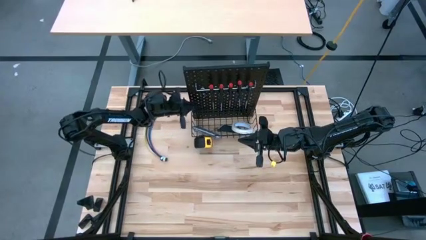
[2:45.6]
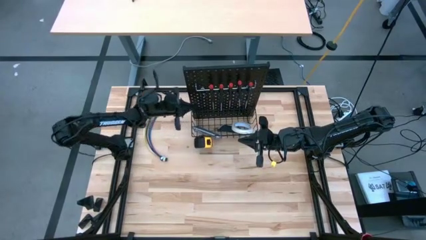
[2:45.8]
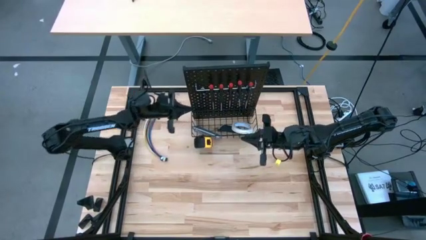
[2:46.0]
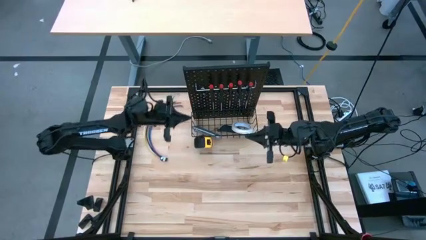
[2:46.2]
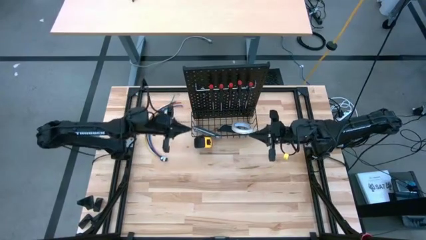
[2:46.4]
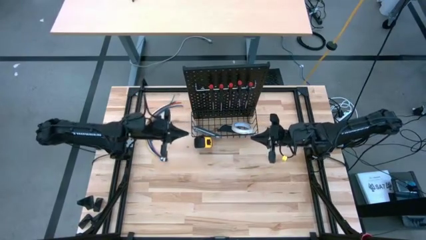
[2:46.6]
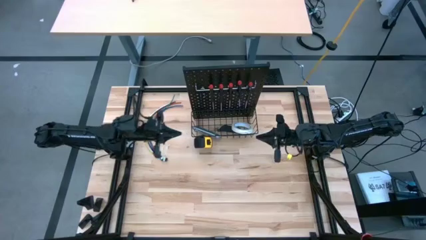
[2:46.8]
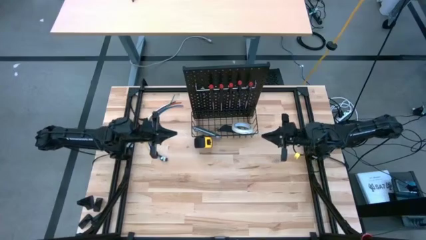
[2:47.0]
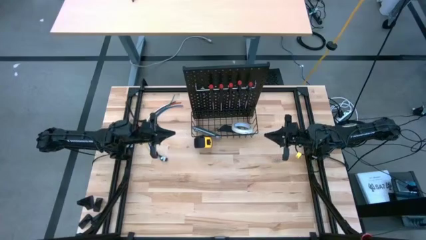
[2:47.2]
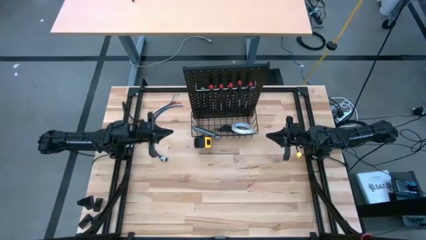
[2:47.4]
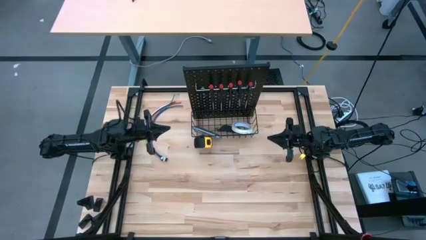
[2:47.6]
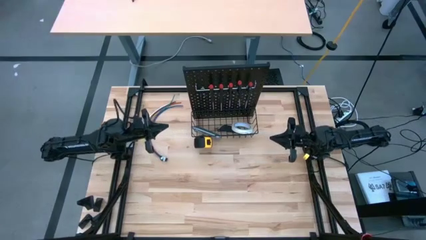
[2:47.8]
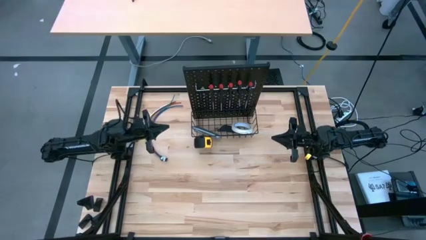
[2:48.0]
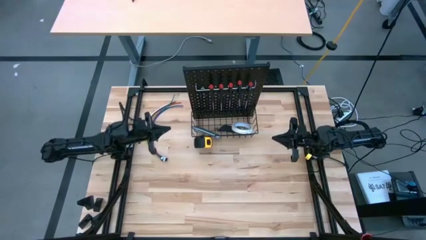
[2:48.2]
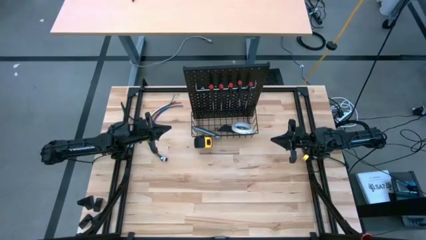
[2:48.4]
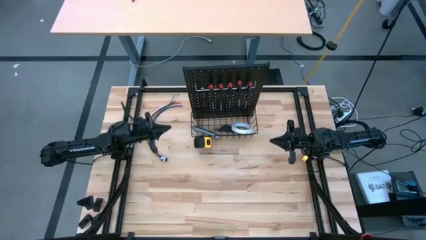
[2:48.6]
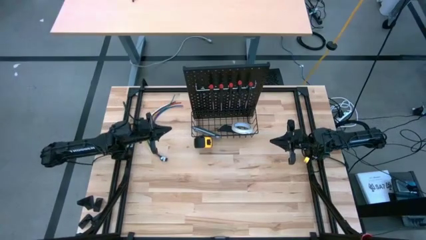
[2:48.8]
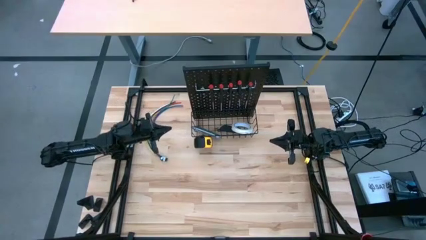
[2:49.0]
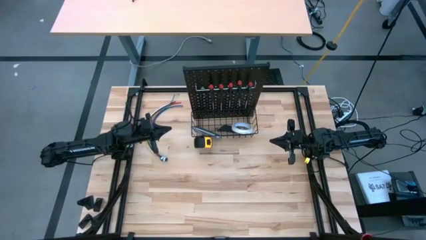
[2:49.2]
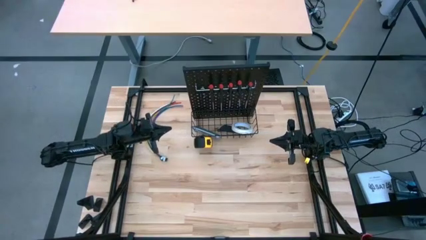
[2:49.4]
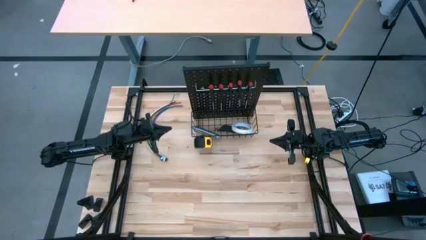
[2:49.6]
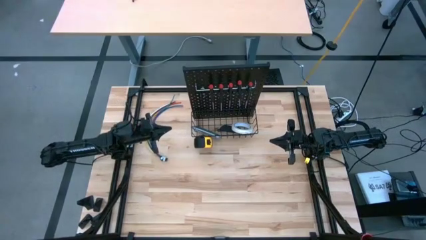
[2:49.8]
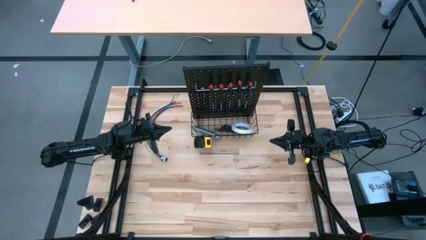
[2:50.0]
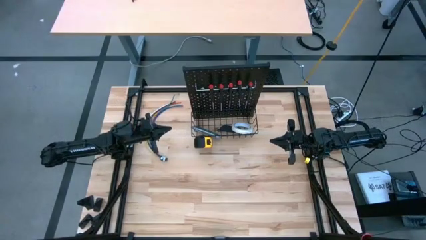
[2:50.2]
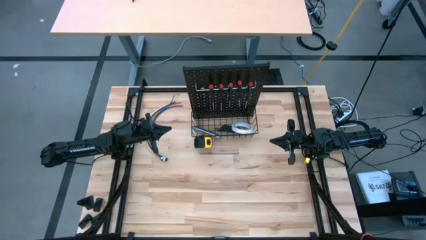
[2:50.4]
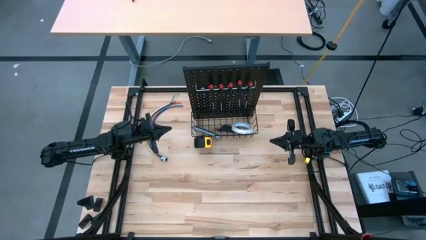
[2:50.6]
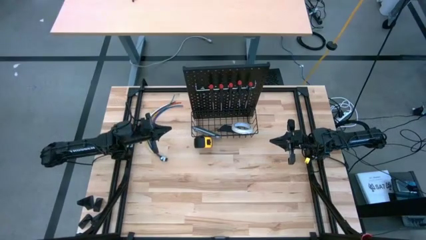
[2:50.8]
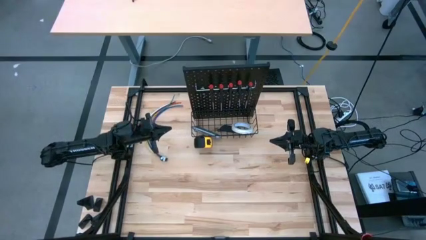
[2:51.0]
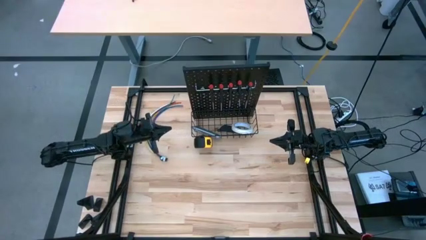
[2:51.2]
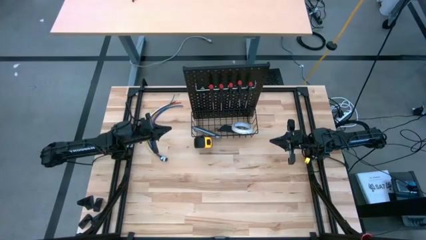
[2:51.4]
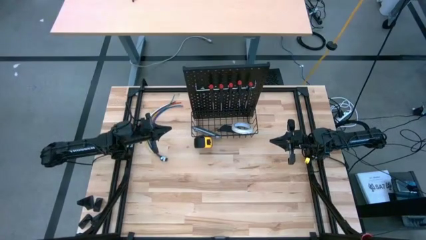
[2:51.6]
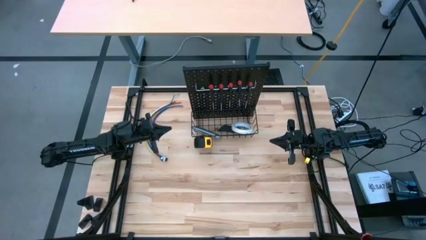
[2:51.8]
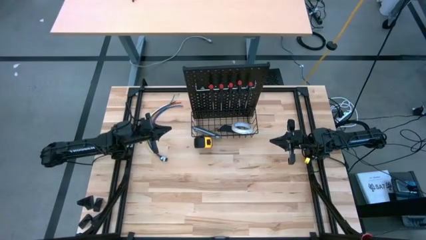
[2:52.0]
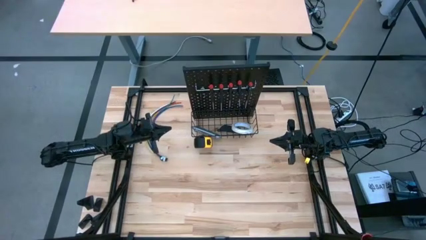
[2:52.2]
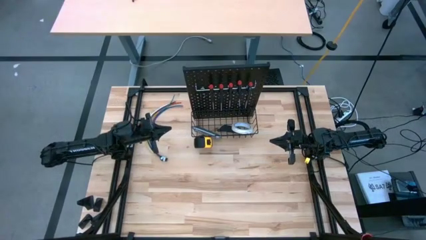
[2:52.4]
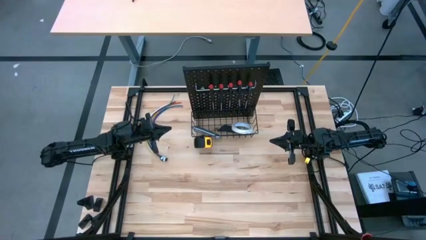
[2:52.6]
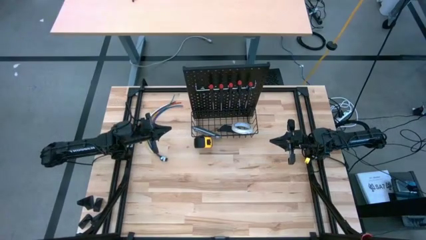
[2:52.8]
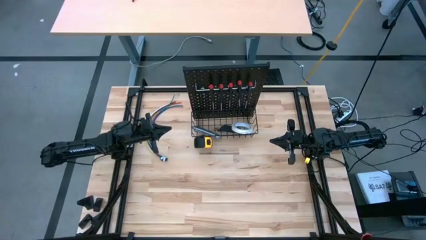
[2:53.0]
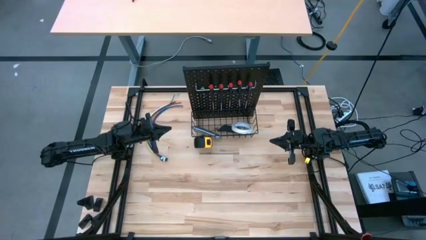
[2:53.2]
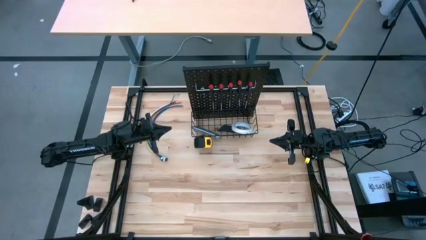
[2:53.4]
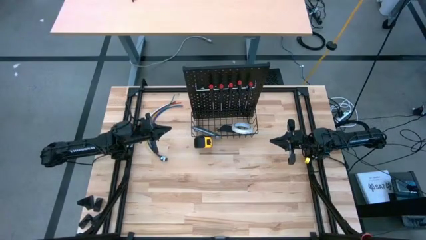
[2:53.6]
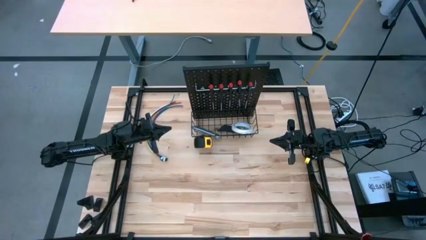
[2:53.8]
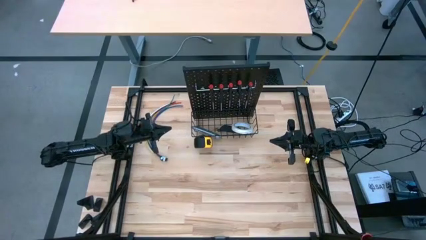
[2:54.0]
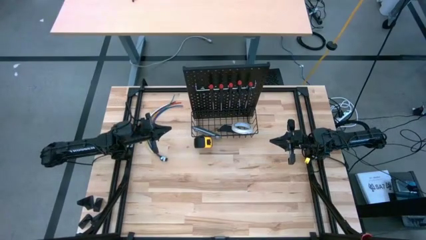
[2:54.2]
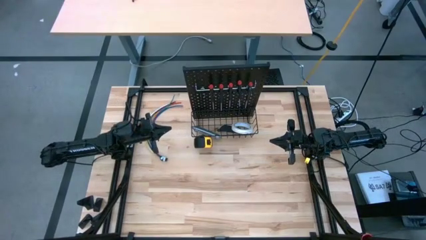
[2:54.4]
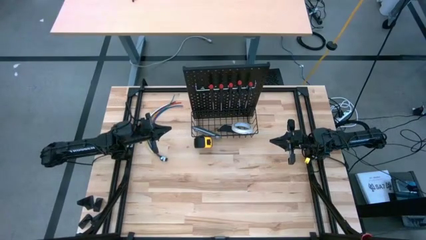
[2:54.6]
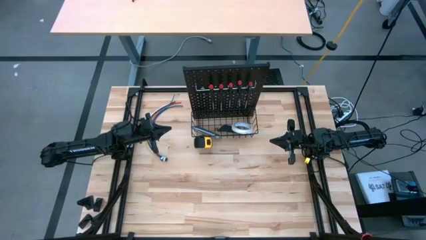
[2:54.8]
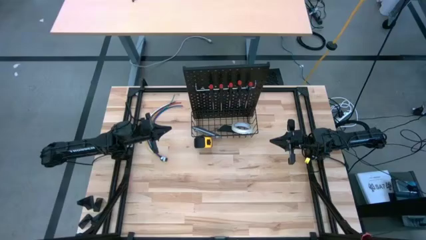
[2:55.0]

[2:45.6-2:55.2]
Task: Hang tools onto peg board
Return to Home Position

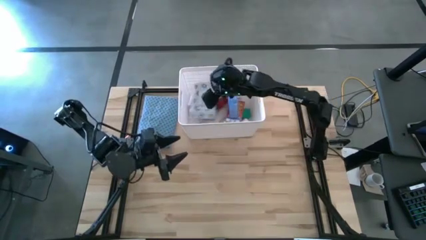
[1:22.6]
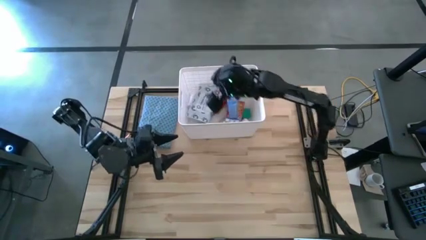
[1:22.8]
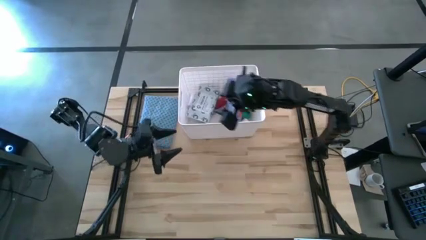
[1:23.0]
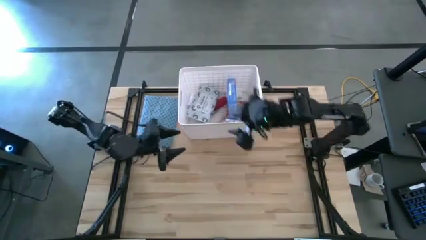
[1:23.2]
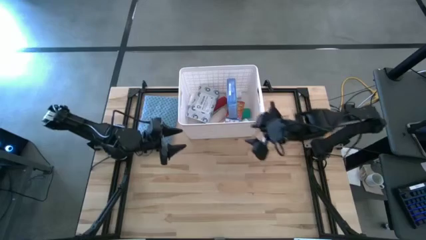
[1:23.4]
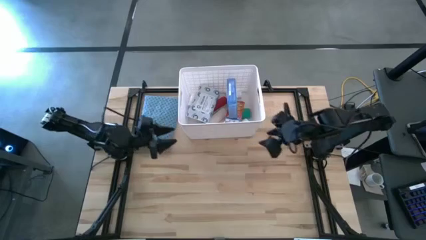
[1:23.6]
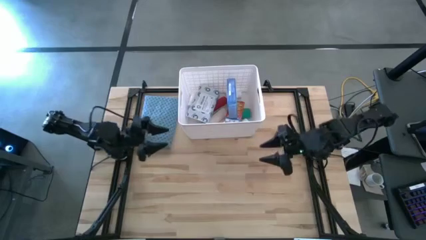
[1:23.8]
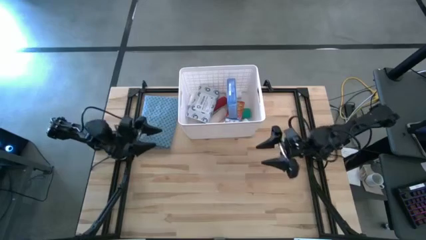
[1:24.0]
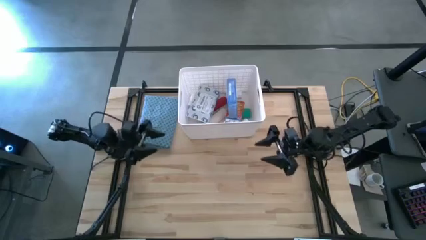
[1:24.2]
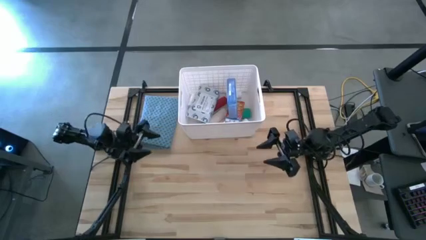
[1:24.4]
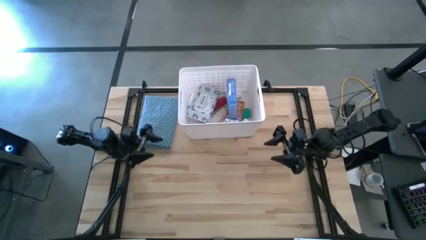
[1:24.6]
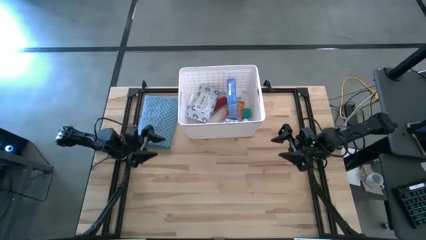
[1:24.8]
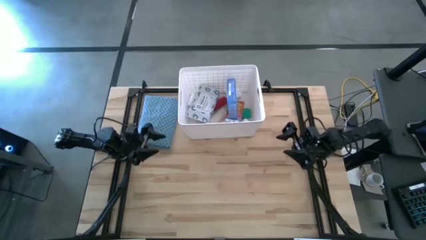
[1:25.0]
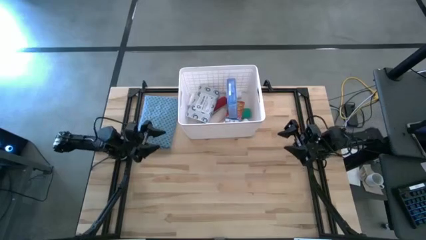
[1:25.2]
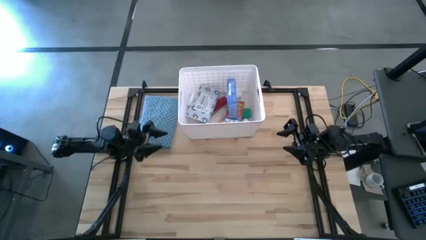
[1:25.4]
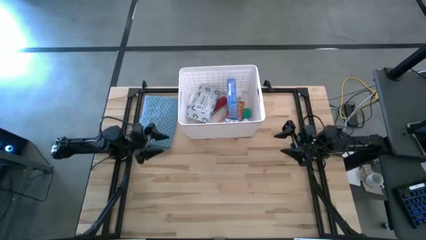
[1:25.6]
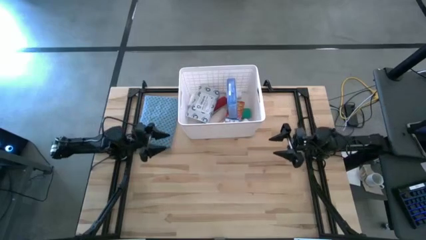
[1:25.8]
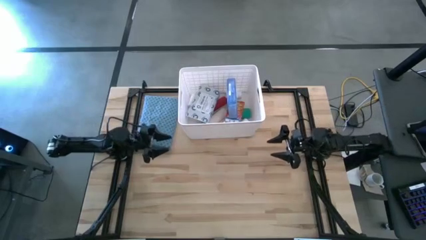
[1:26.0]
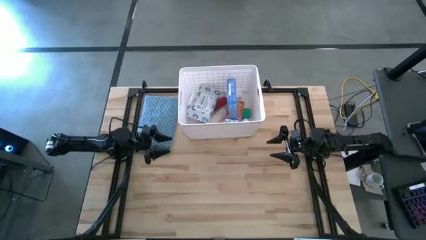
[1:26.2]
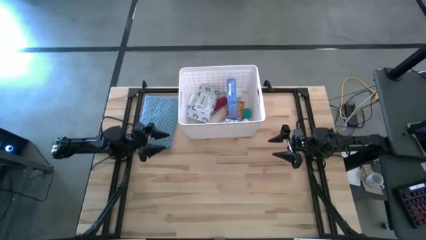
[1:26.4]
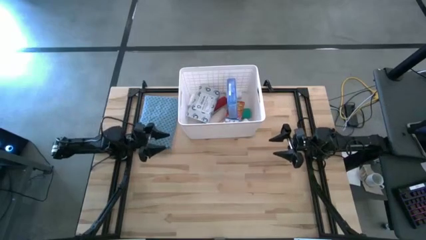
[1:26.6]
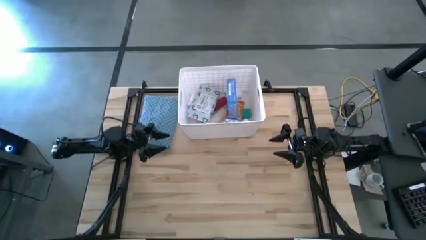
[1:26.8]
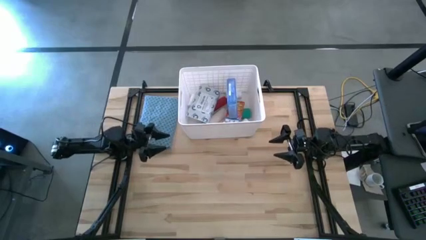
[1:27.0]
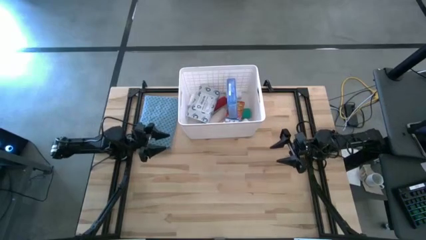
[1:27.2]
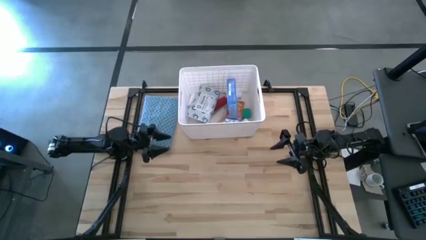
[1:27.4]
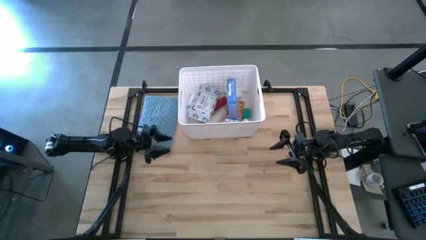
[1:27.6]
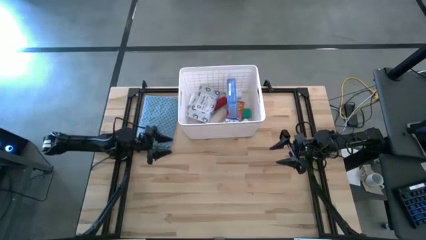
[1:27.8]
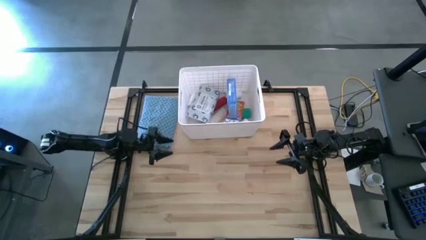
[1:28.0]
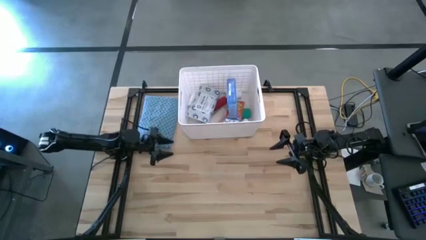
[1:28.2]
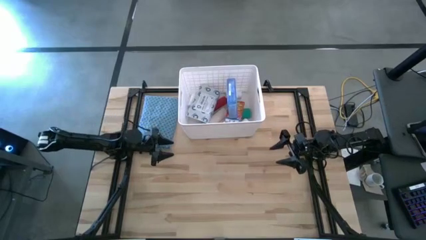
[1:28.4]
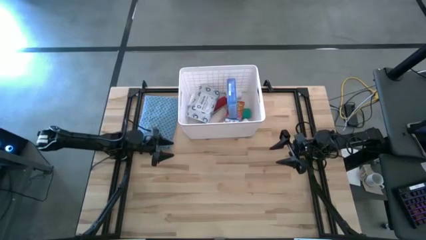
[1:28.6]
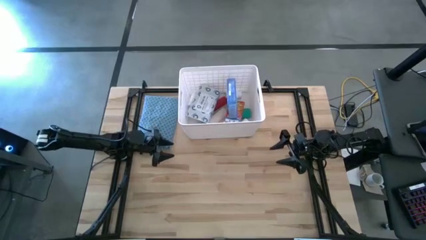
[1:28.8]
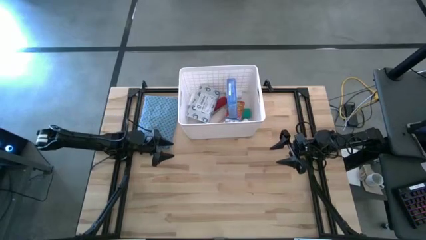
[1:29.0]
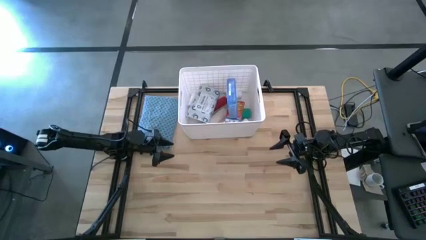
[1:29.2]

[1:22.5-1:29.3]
Task: Pick & place medical supplies in basket/bin
Return to Home Position
